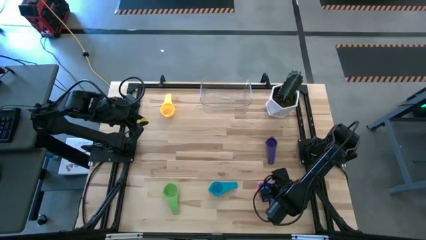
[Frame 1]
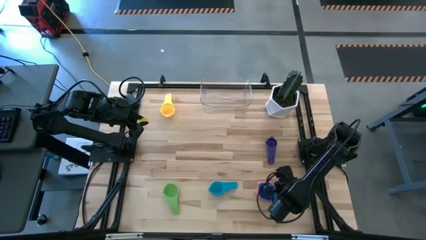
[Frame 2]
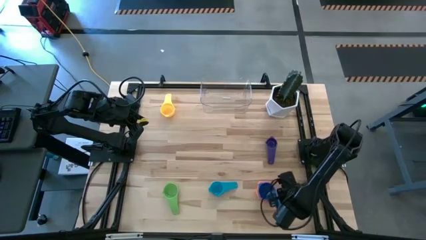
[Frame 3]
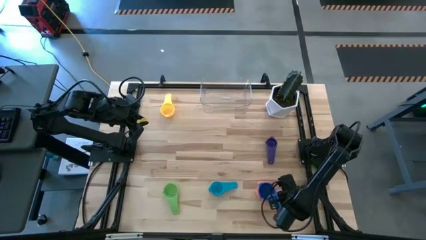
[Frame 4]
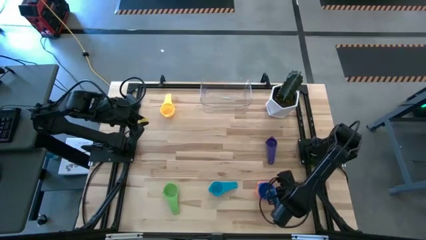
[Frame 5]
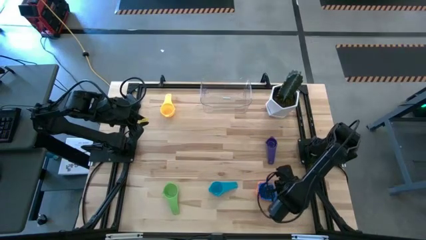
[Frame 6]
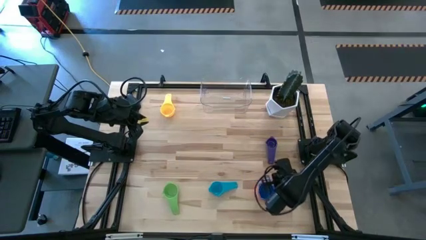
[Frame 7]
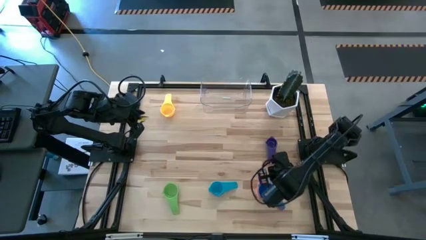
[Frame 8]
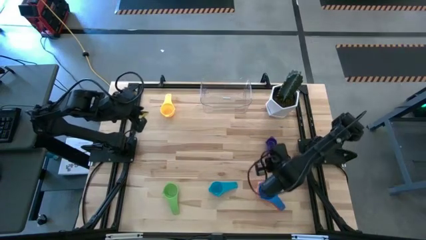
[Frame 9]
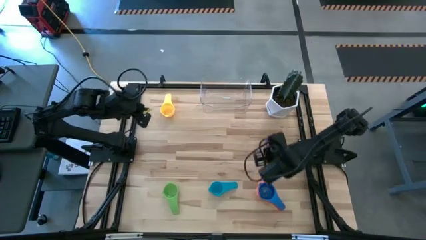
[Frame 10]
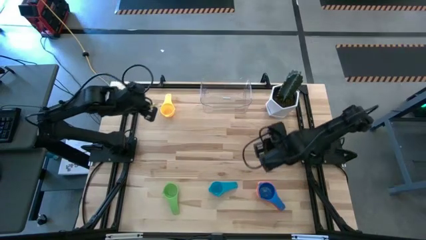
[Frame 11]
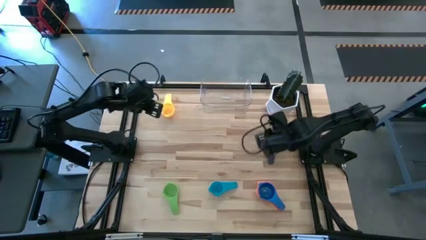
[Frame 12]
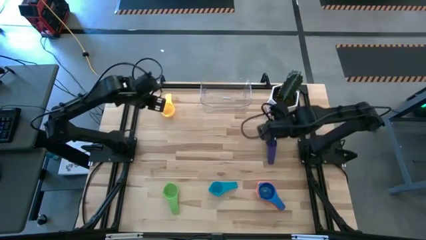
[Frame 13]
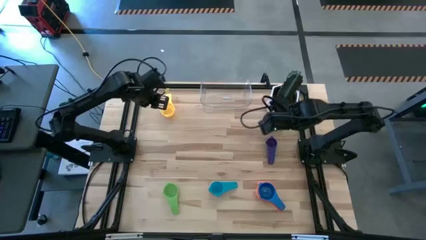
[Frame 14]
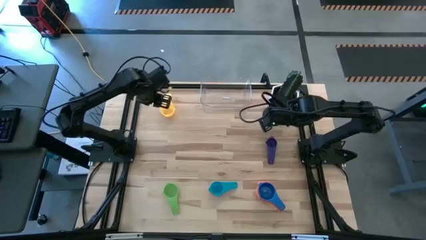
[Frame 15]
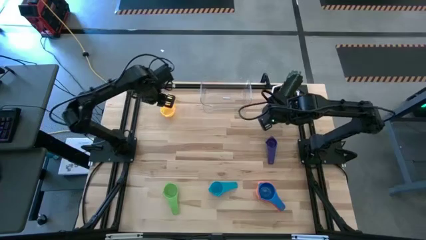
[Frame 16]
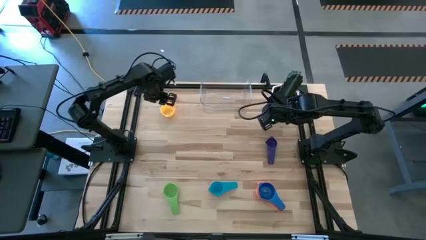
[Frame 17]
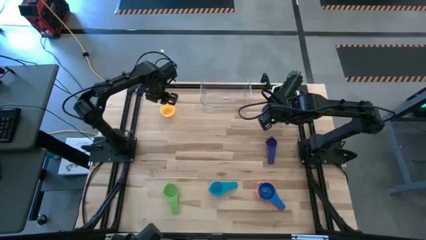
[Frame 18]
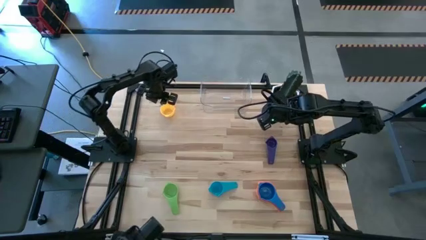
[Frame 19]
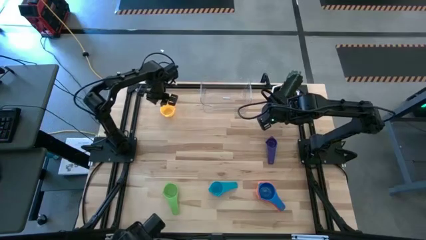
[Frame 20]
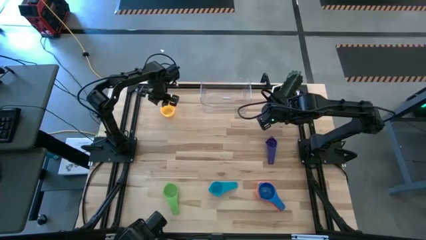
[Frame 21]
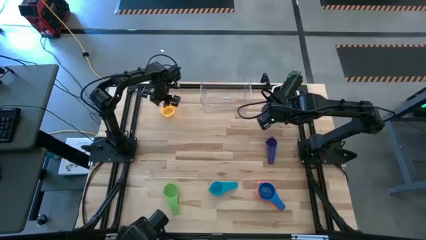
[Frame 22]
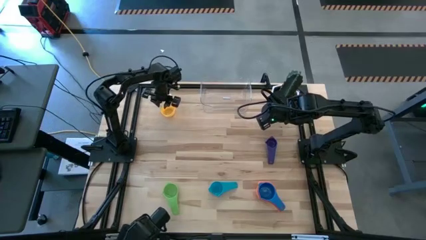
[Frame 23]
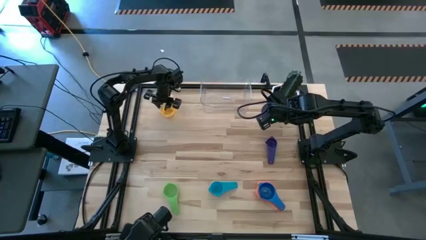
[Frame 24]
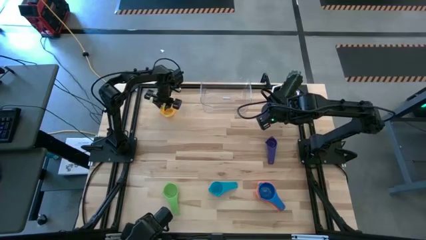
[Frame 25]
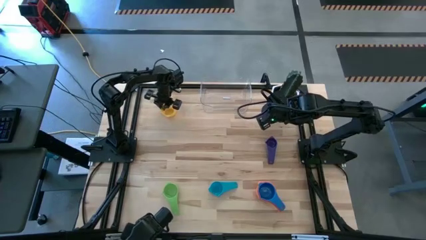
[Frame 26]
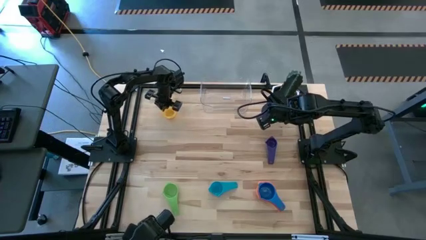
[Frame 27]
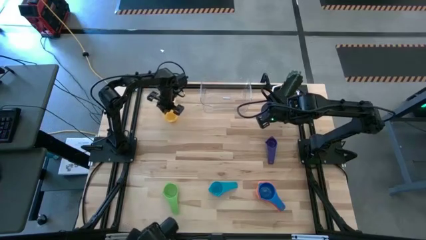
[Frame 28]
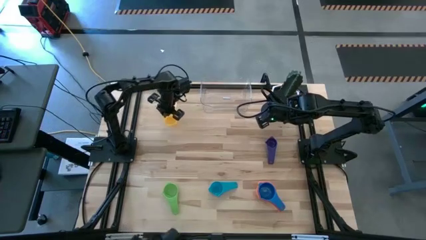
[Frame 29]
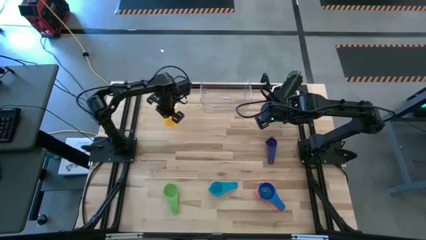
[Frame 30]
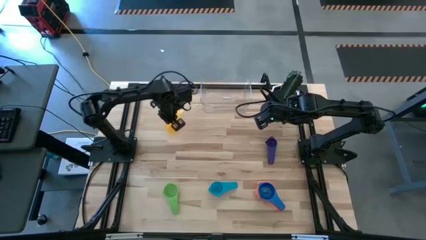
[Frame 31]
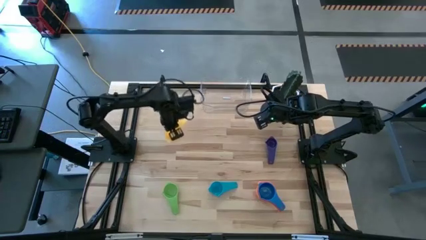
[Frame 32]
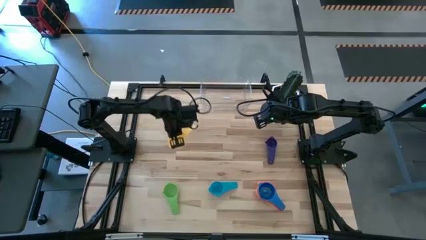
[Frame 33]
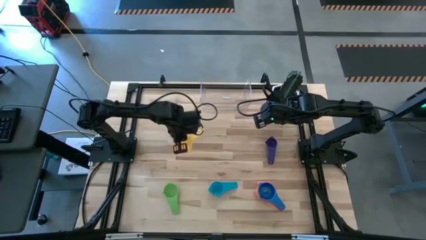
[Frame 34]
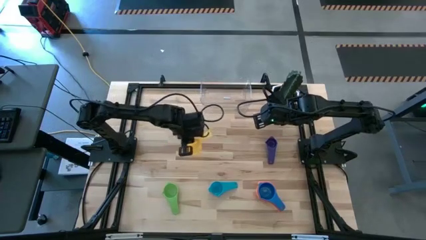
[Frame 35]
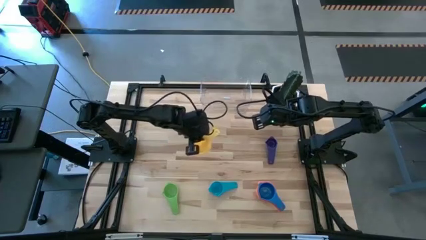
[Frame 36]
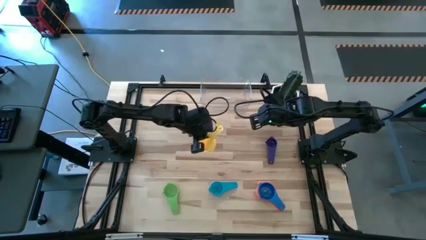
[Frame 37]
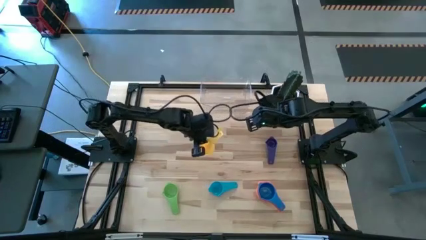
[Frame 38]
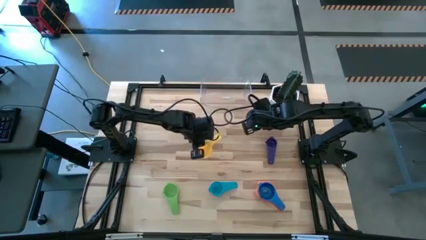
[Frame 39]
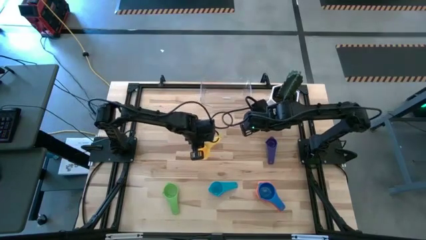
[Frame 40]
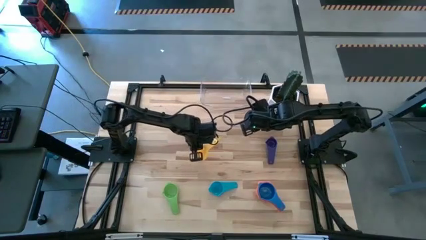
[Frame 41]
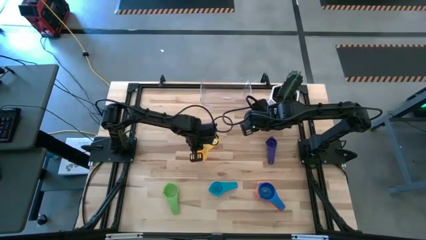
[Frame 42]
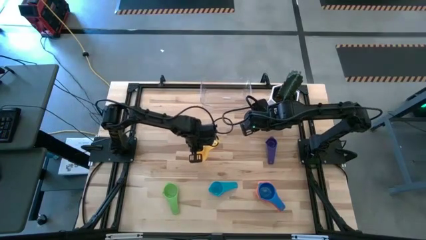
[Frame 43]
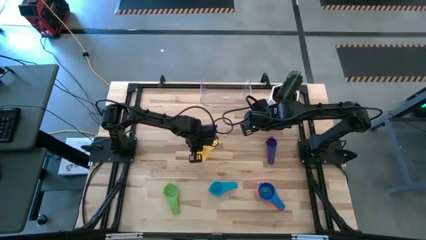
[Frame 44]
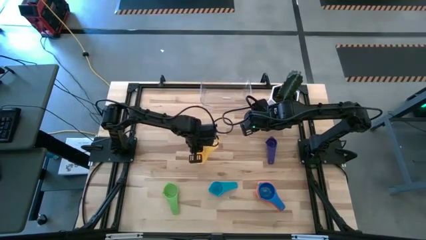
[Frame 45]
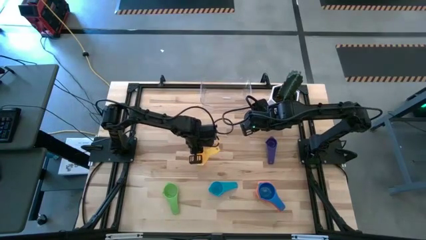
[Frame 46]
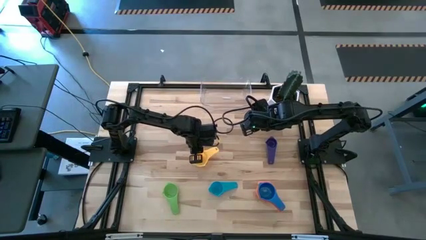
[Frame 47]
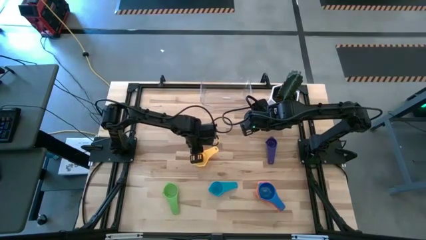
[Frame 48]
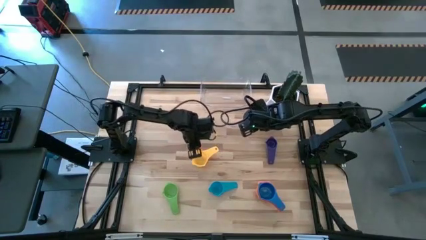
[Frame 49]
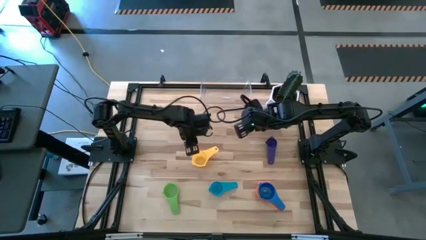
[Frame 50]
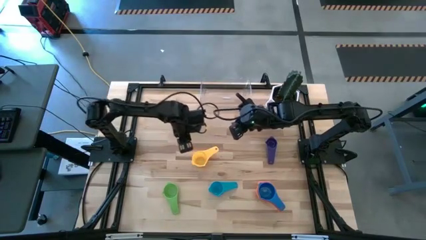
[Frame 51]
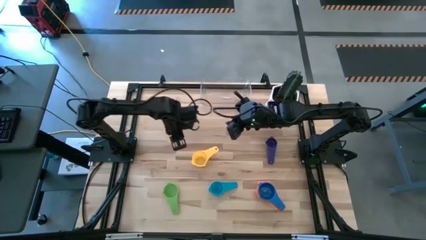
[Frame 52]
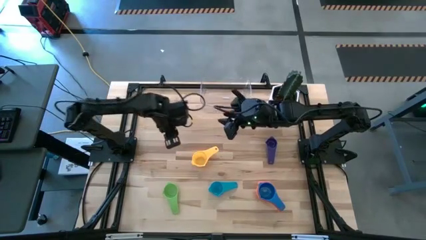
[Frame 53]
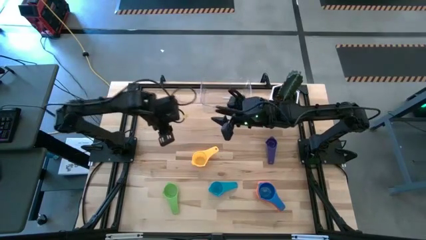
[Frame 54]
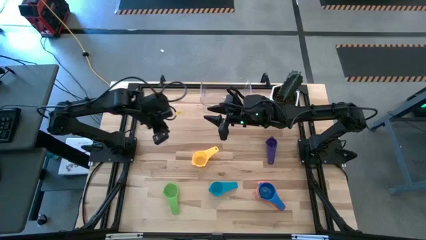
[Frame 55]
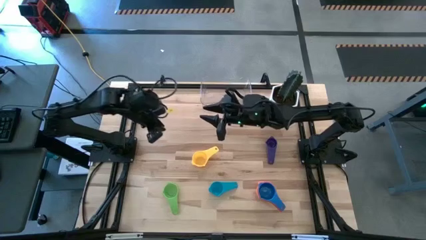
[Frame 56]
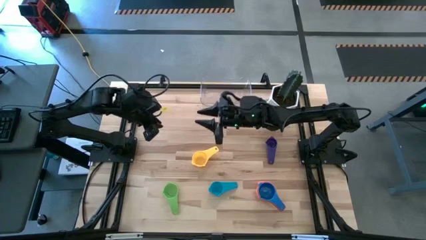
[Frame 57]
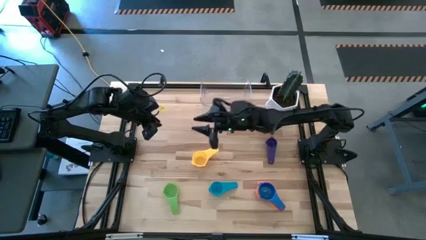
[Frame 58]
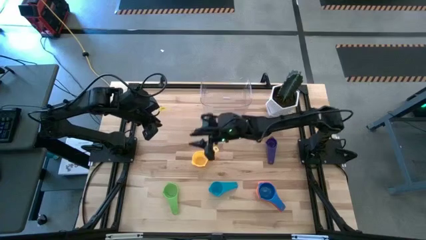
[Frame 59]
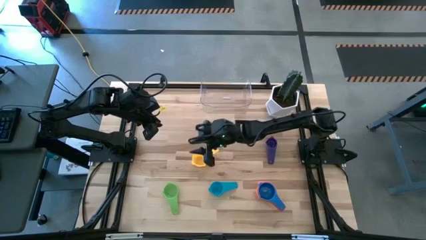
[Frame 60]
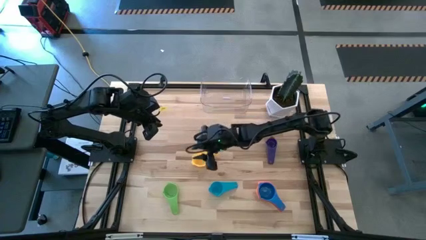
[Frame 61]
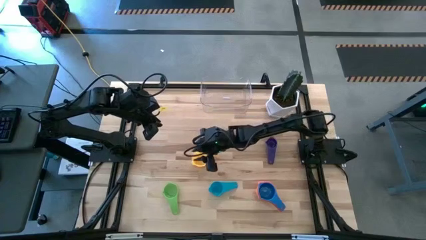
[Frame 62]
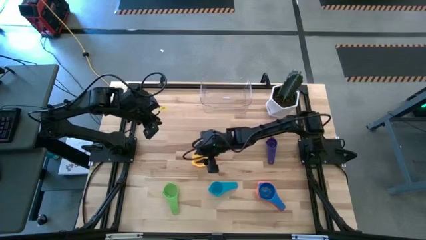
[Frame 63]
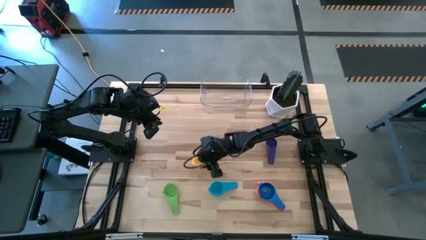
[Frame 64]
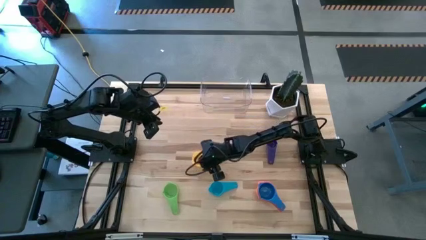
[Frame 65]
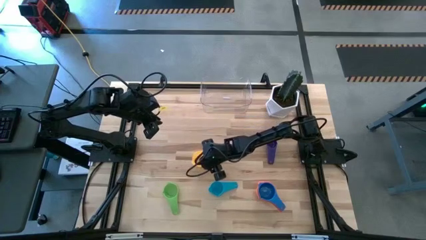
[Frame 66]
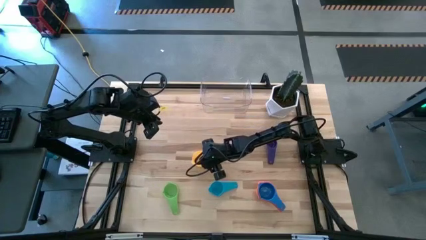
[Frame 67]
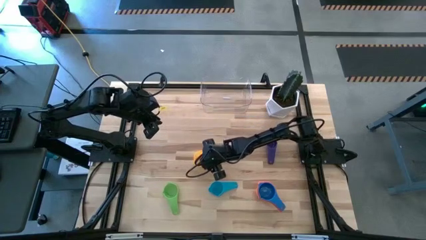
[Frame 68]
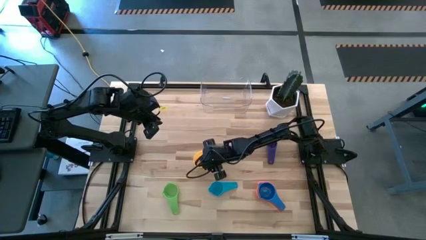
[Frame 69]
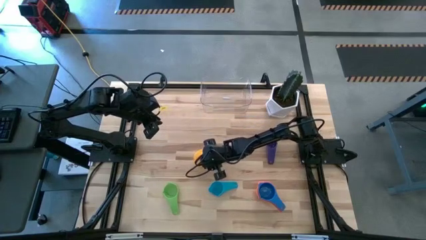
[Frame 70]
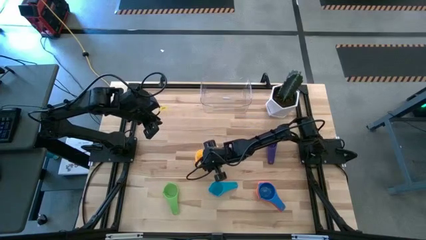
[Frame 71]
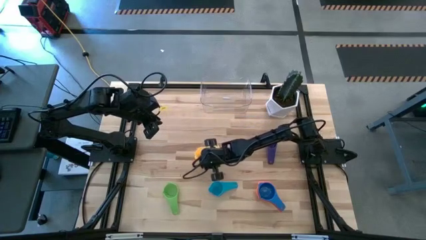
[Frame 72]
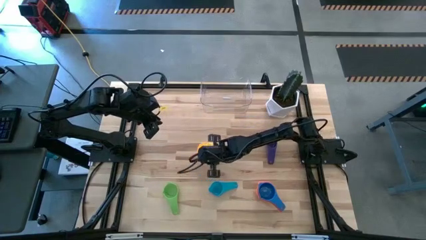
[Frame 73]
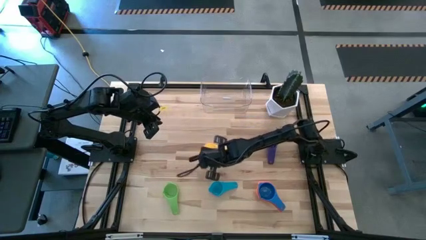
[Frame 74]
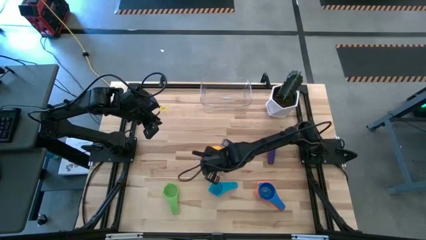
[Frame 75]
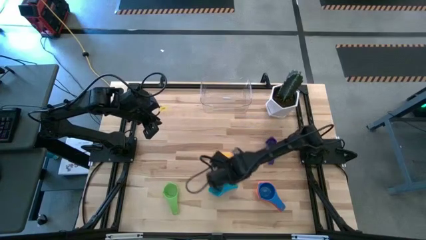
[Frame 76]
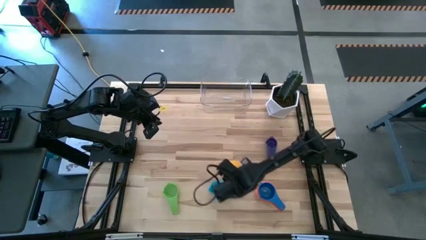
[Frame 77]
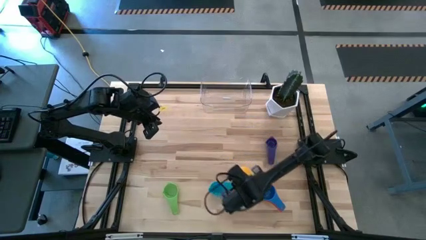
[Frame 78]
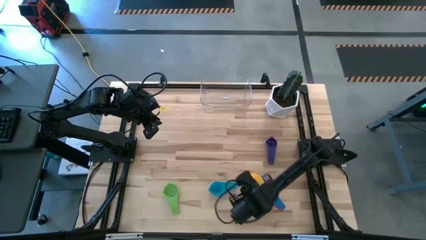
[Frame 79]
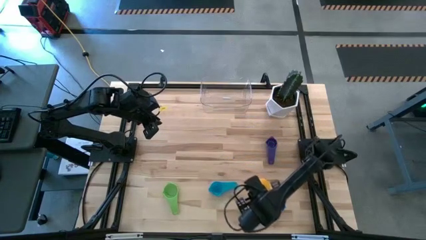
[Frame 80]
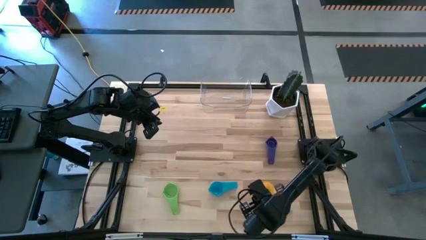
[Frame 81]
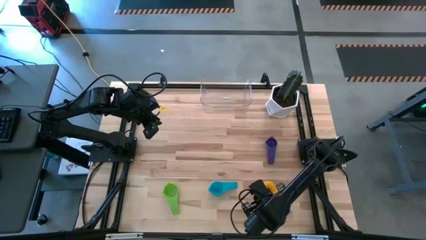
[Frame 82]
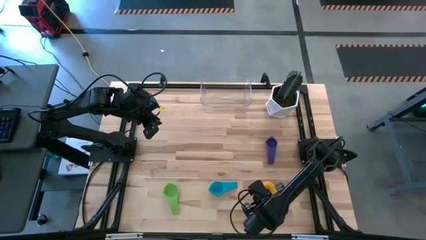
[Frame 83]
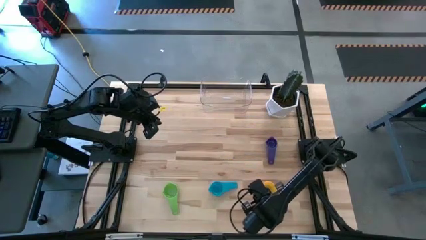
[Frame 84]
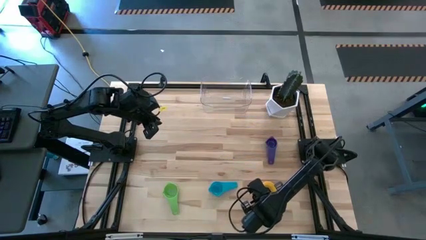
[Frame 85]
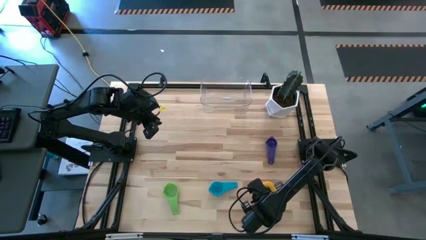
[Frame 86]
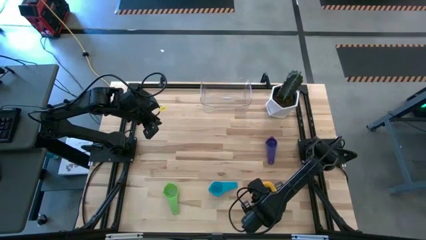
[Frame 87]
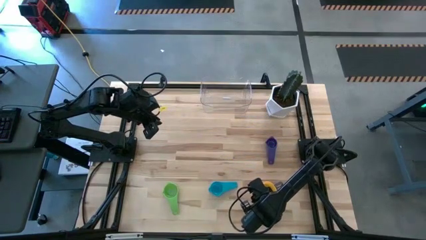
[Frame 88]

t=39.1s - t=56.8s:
Task: Nest measuring cups in basket
Stack the yellow measuring cup on top of the blue measuring cup
